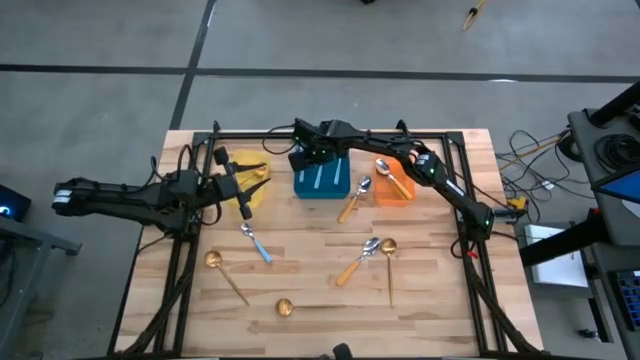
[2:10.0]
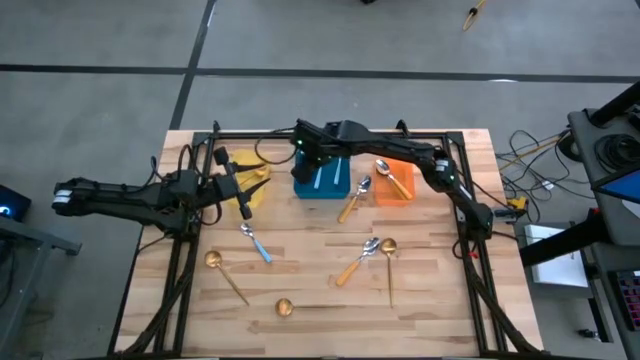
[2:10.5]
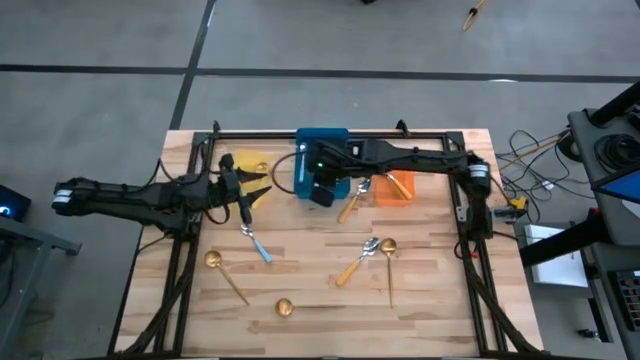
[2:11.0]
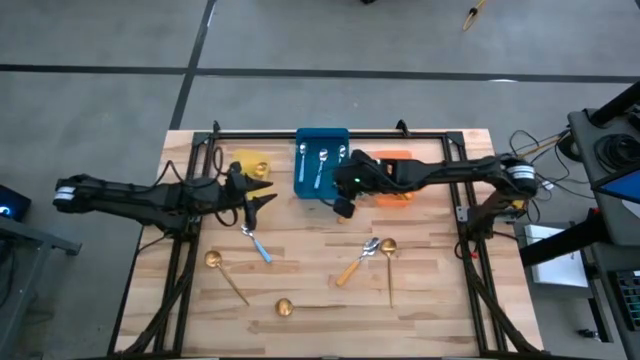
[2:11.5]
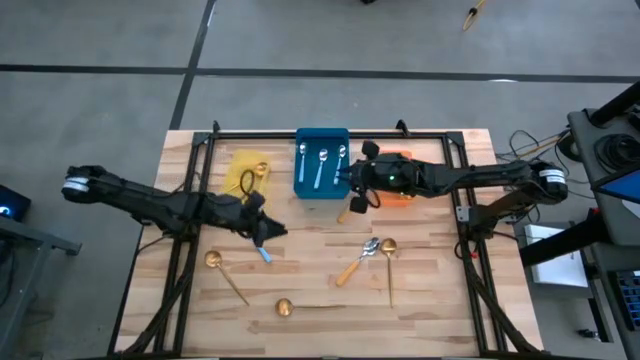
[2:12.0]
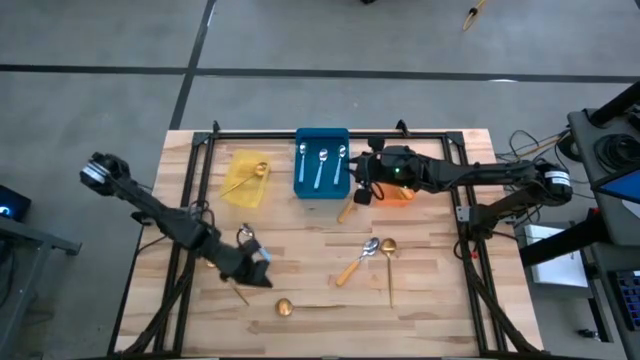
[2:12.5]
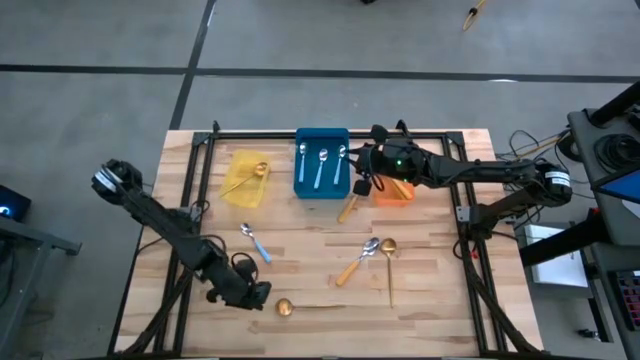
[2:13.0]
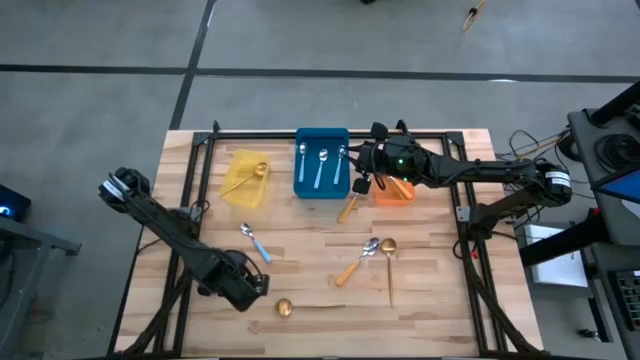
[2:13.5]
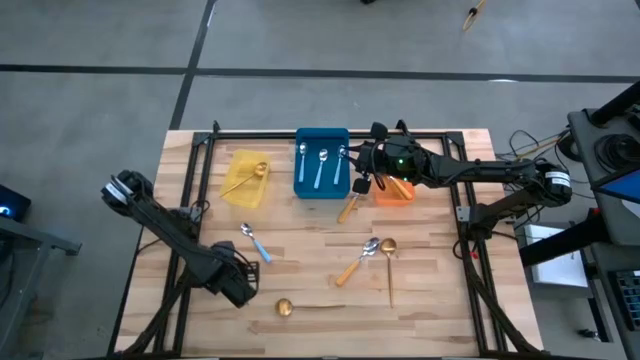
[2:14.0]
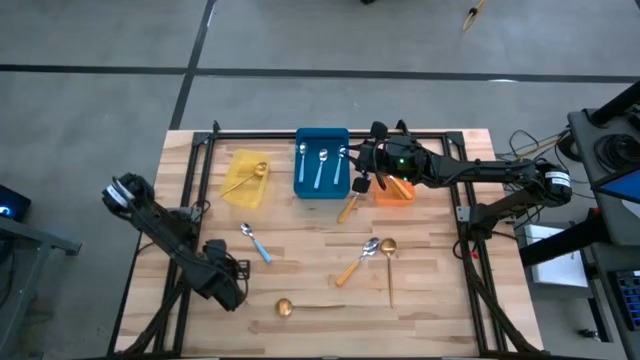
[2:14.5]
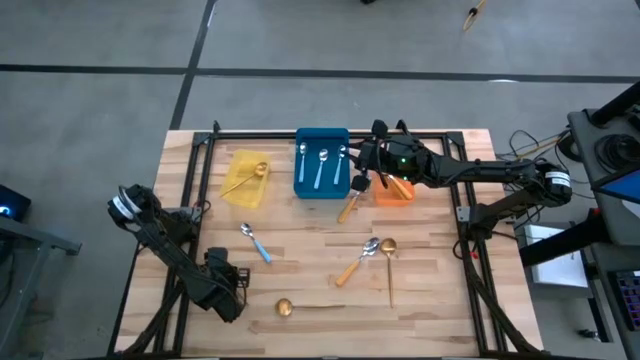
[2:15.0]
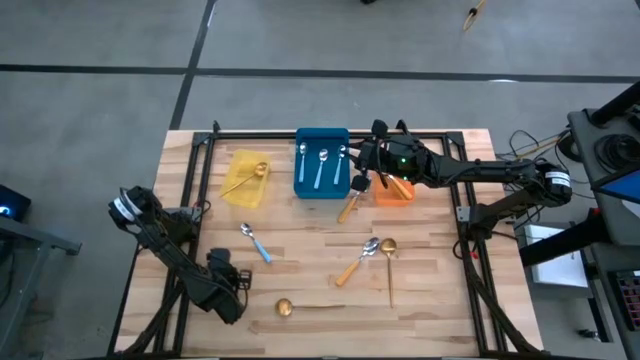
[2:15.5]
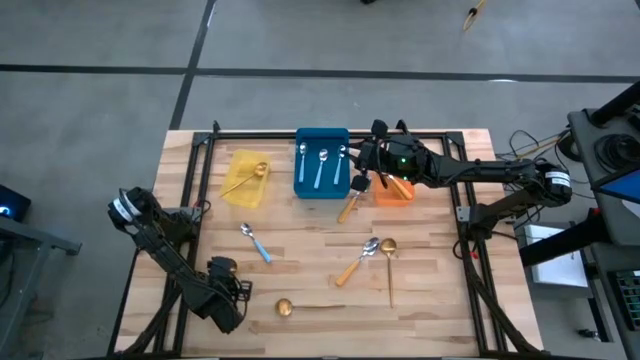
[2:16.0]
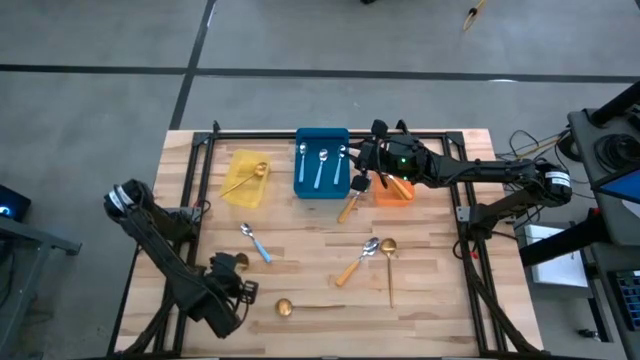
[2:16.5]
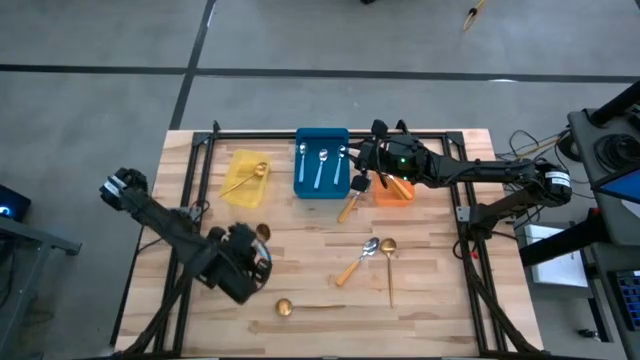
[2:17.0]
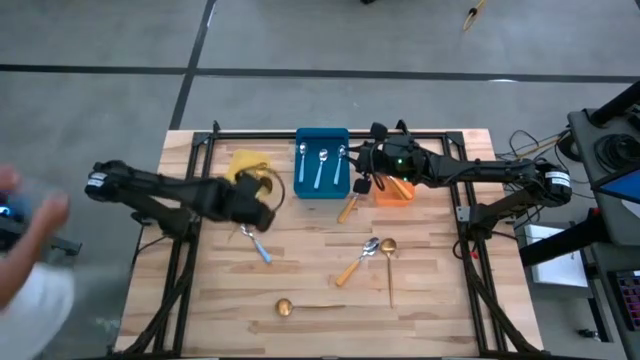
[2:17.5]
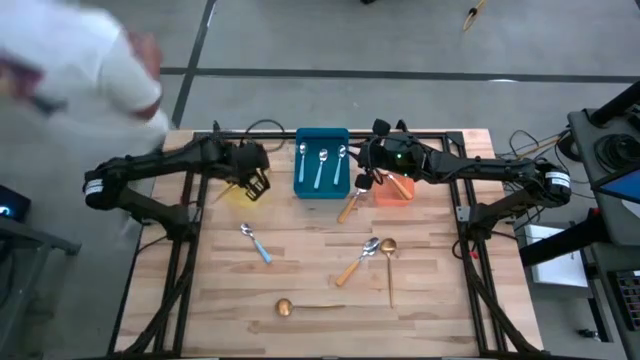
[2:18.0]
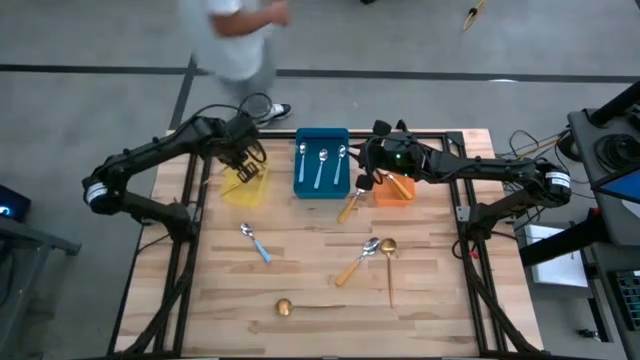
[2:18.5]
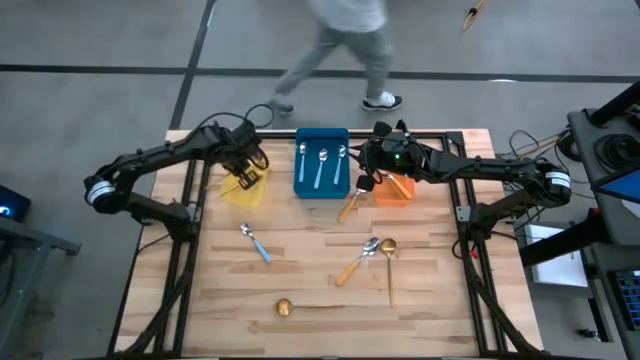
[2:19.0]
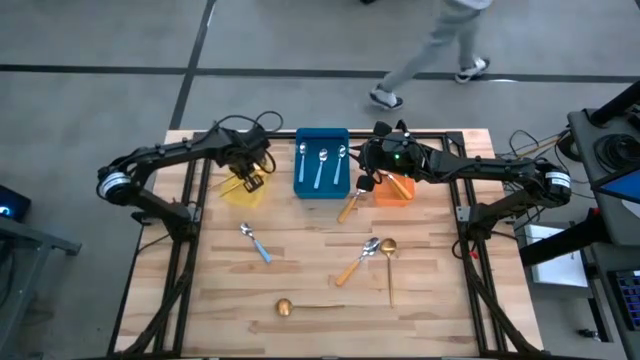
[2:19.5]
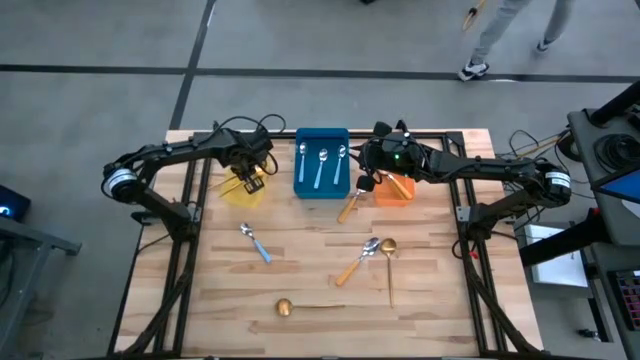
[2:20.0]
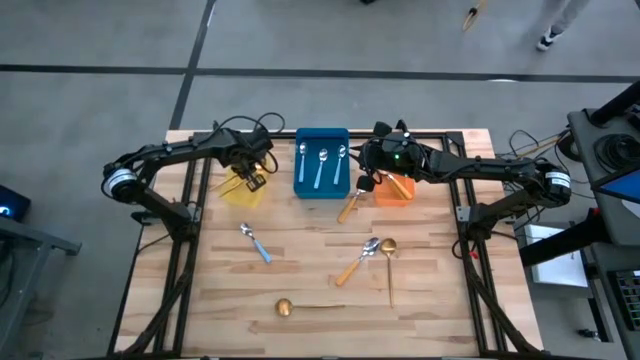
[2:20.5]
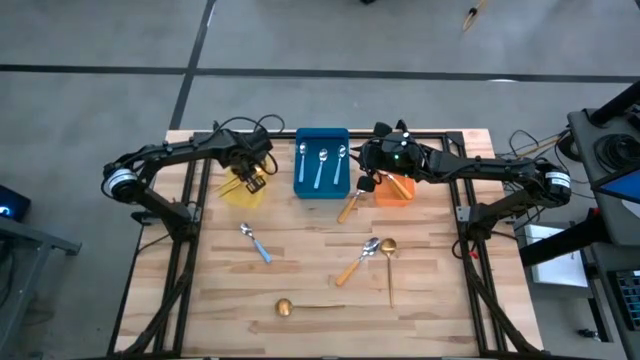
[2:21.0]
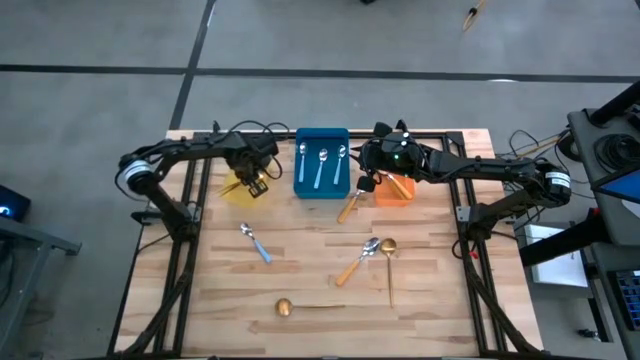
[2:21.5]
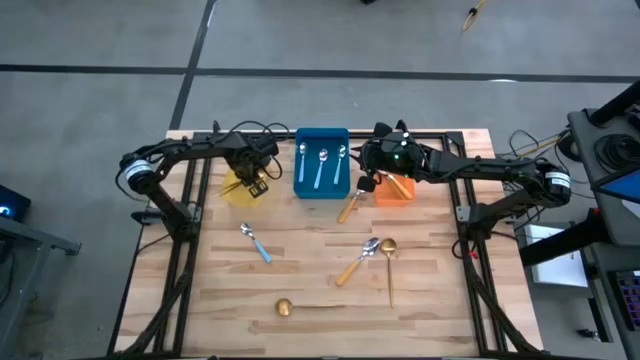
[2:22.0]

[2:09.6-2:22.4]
Task: Sort silverware by color (type)
Put the gold spoon into the yellow bin

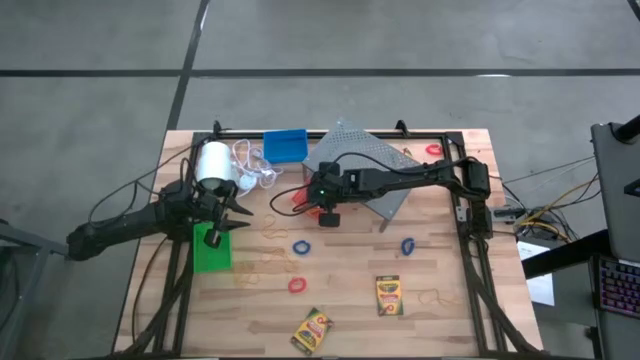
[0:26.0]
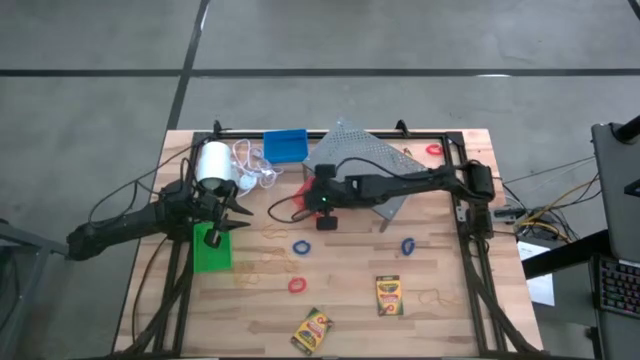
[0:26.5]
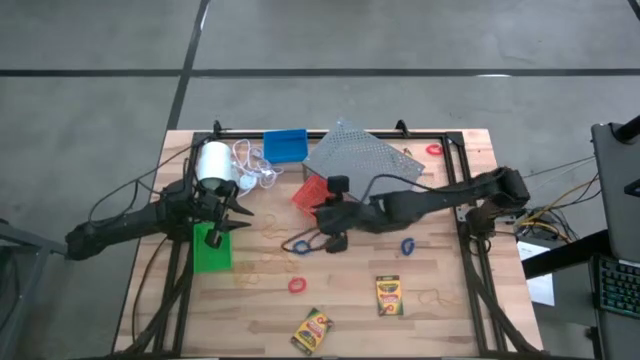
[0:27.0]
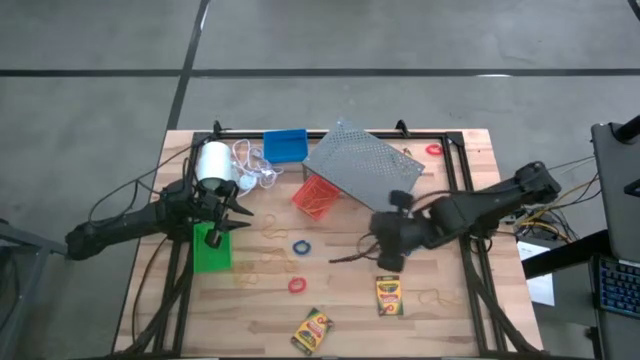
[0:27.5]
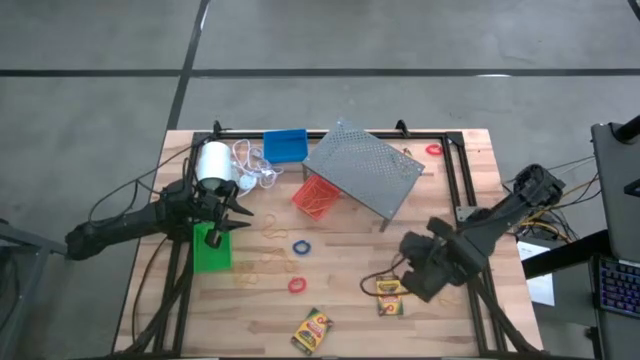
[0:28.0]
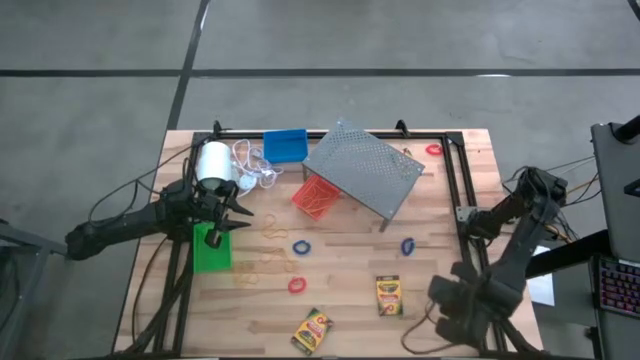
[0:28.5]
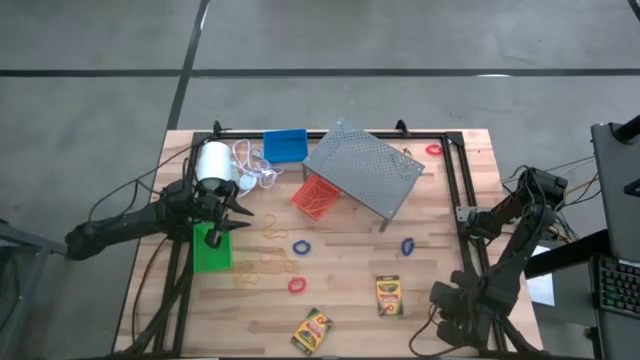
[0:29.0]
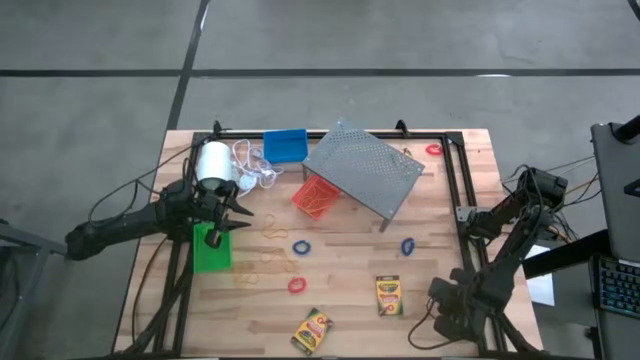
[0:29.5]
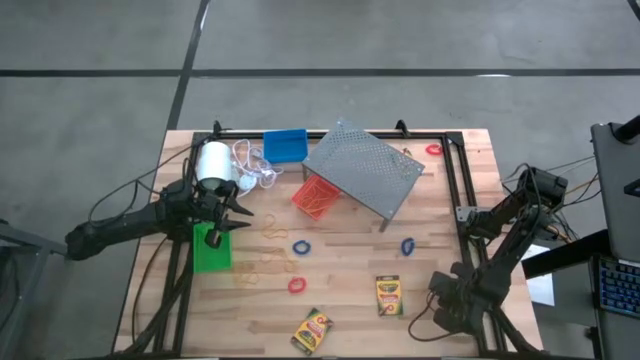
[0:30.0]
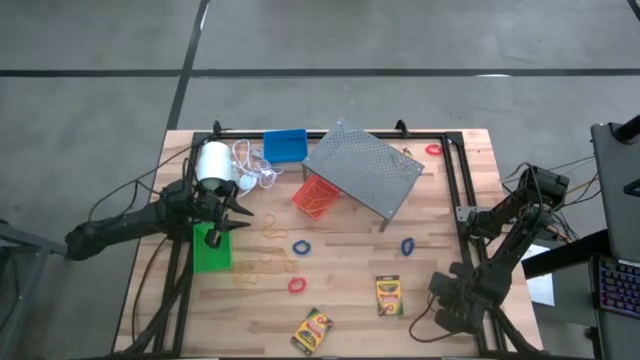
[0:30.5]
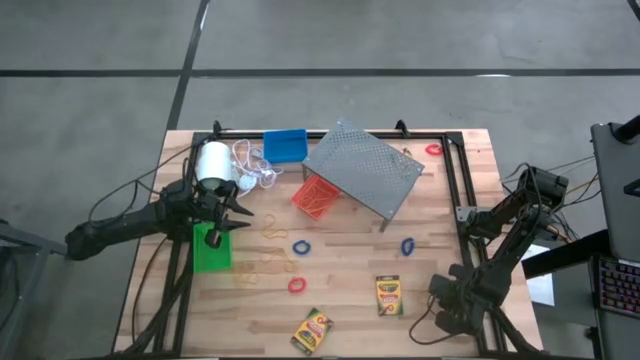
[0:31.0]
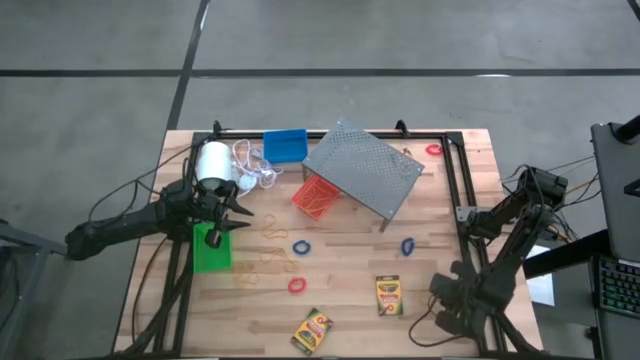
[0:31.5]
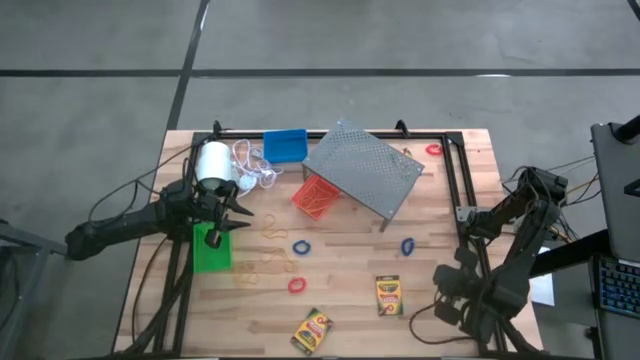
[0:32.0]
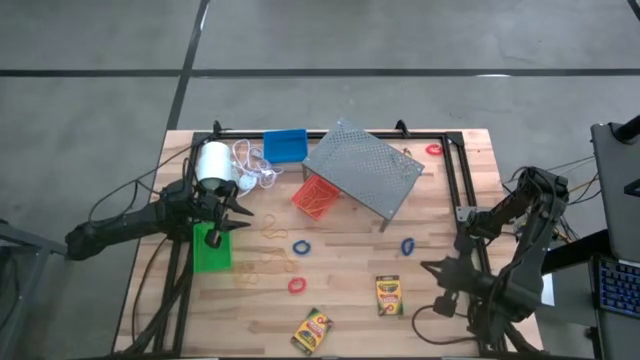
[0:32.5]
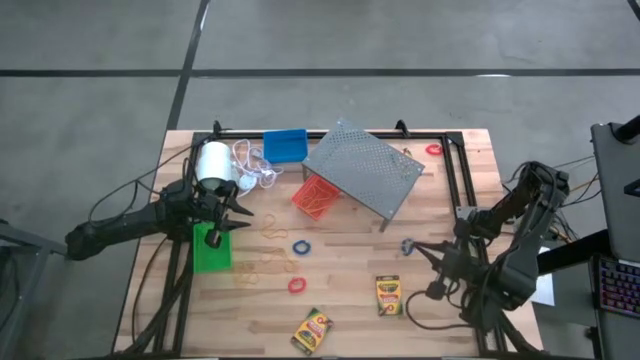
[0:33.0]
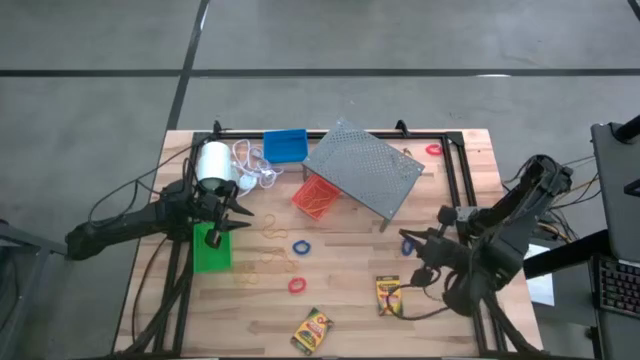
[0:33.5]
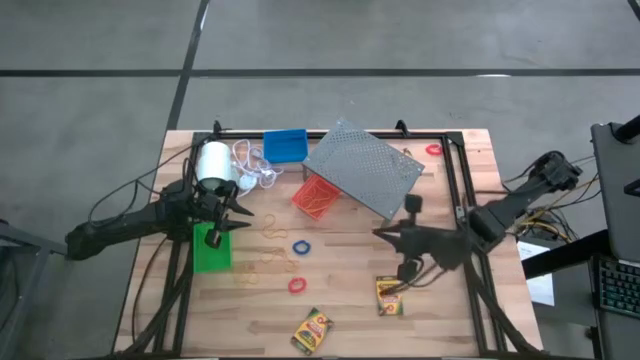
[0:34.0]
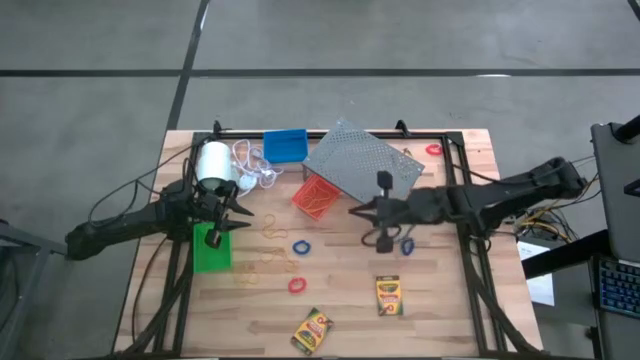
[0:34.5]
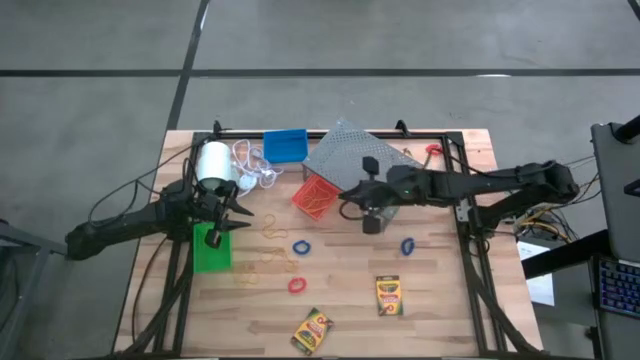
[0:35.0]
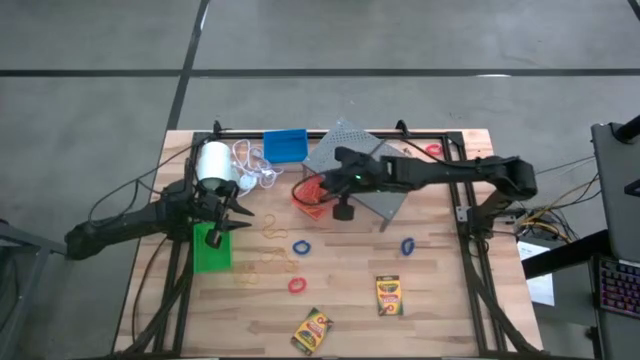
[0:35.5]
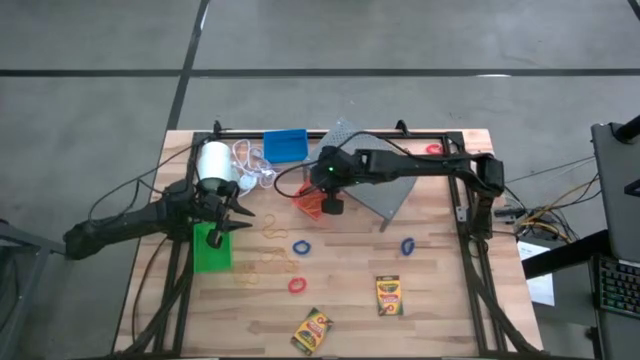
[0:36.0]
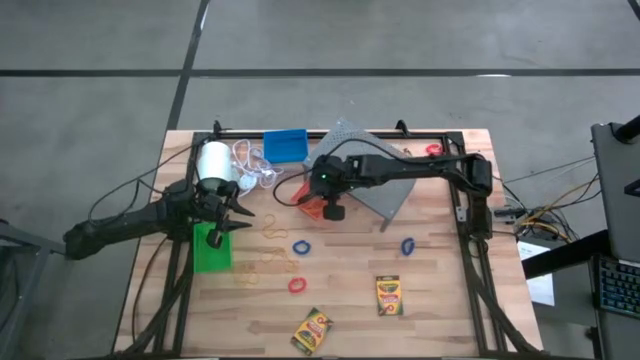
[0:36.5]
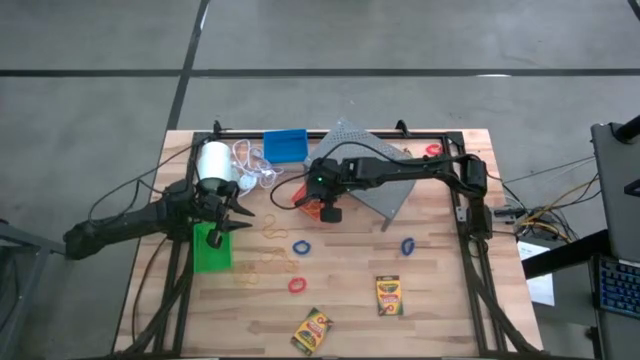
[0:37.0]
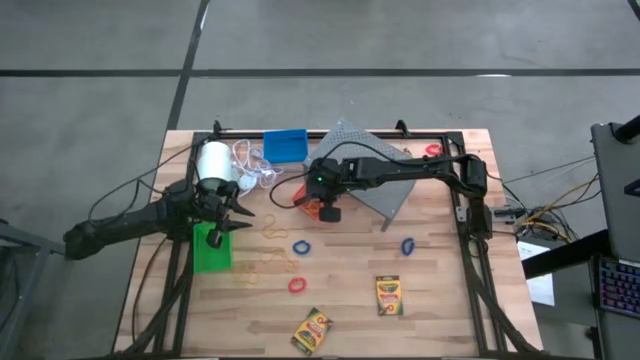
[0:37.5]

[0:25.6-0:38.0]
Task: Pick & Place Office Desk Supplies
Put the yellow rubber band into the orange bin
